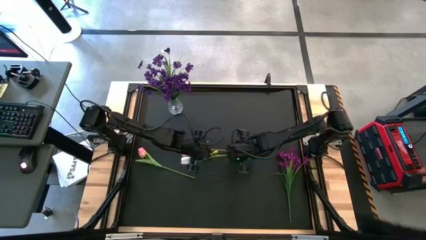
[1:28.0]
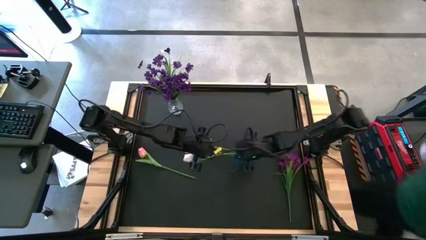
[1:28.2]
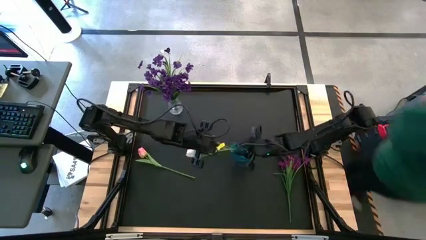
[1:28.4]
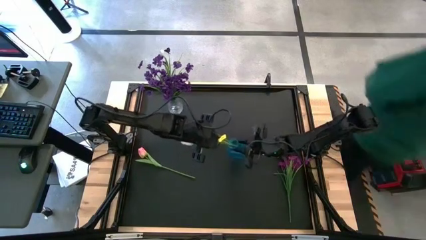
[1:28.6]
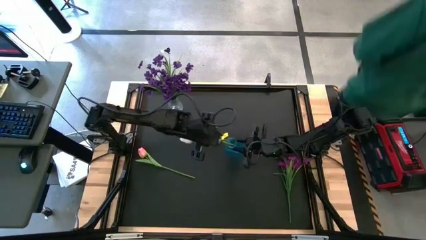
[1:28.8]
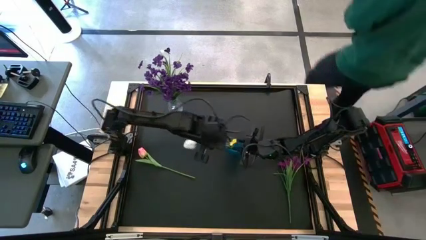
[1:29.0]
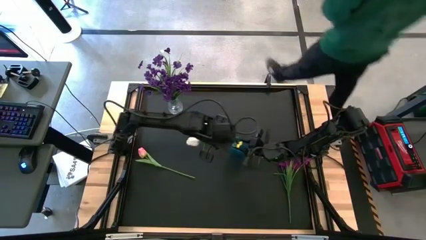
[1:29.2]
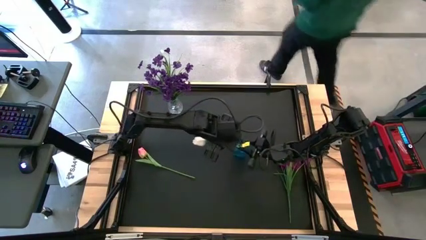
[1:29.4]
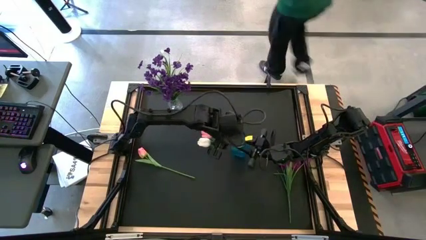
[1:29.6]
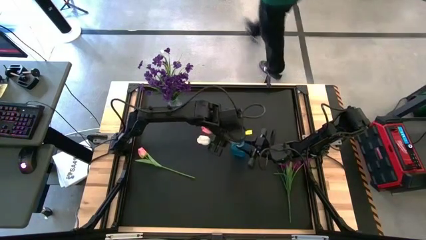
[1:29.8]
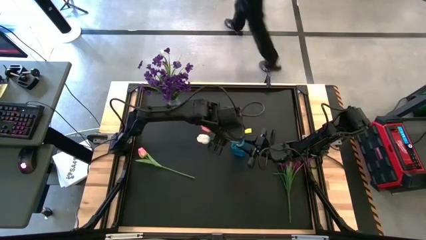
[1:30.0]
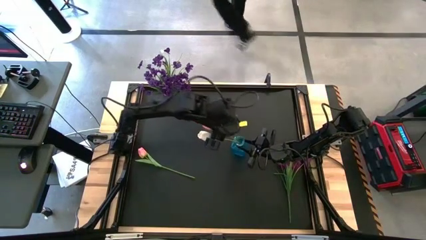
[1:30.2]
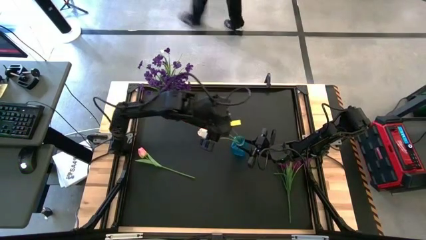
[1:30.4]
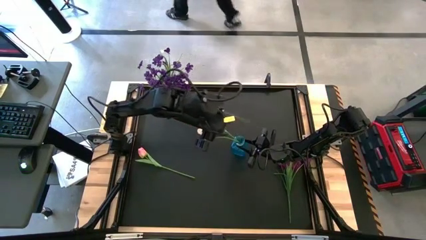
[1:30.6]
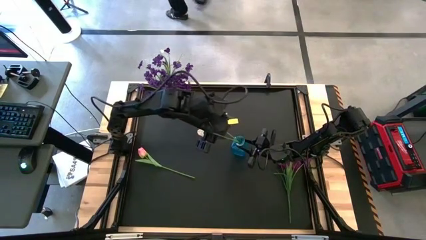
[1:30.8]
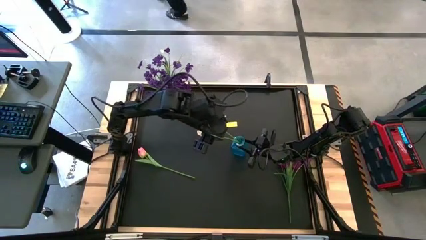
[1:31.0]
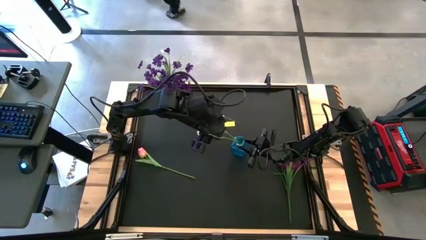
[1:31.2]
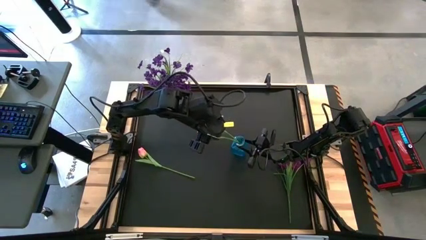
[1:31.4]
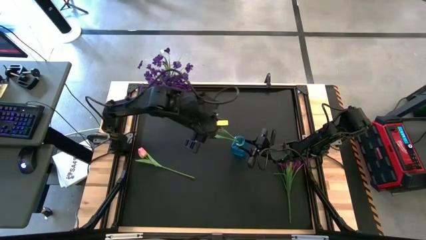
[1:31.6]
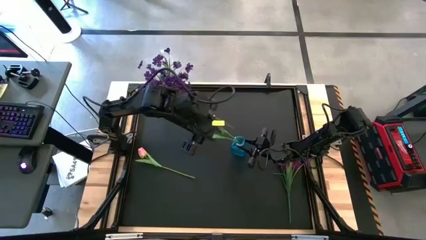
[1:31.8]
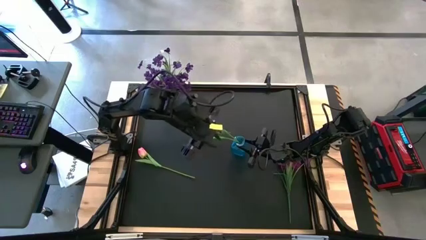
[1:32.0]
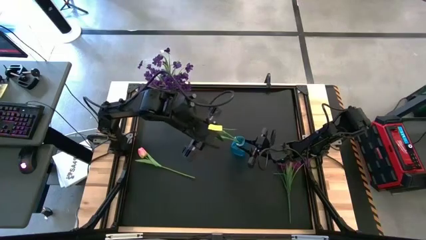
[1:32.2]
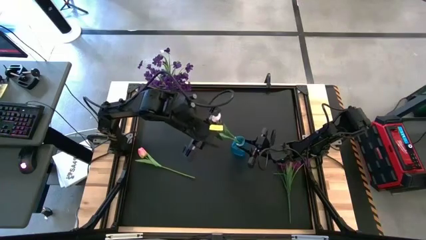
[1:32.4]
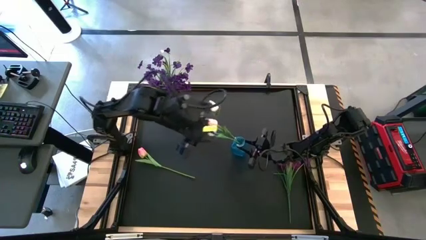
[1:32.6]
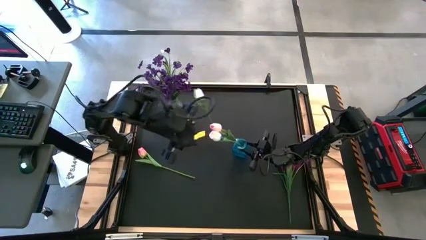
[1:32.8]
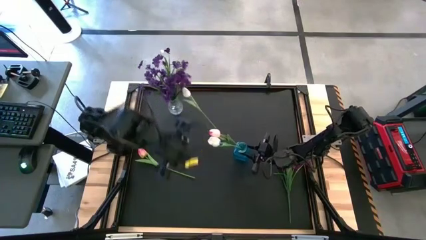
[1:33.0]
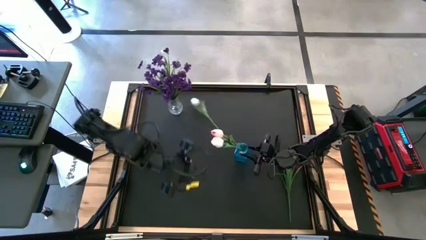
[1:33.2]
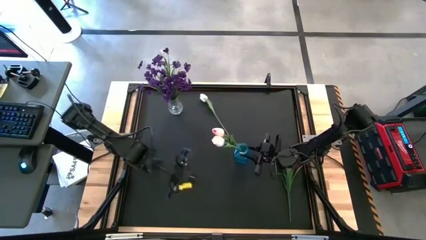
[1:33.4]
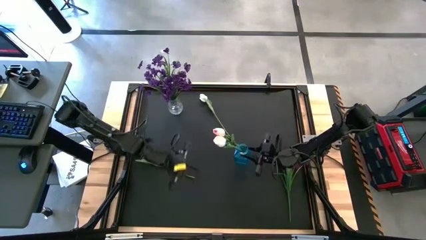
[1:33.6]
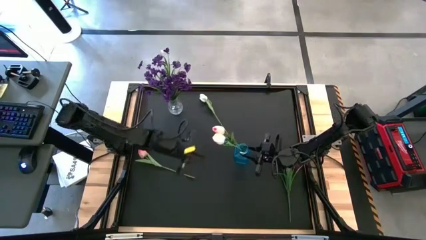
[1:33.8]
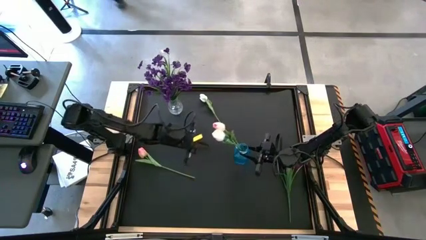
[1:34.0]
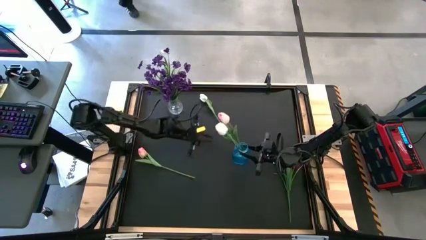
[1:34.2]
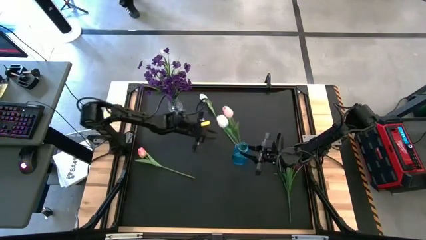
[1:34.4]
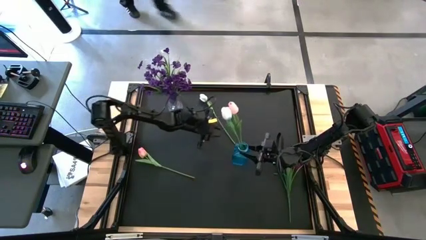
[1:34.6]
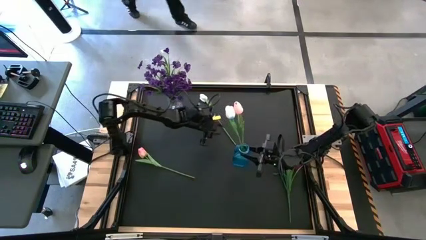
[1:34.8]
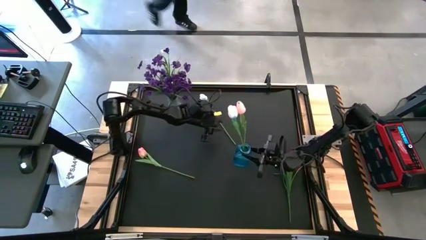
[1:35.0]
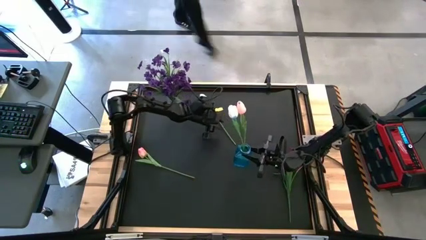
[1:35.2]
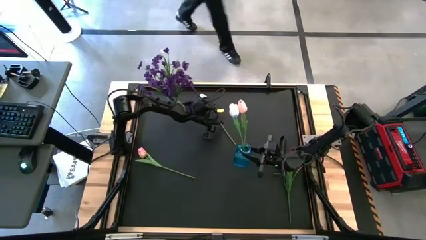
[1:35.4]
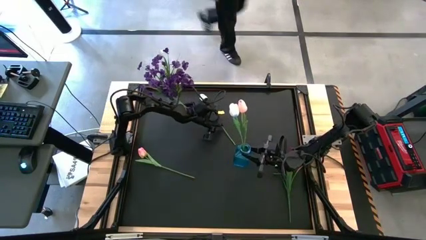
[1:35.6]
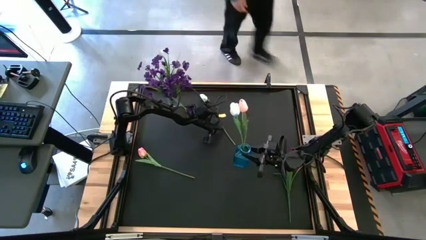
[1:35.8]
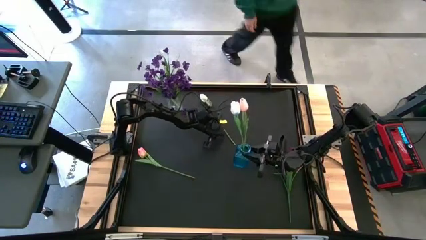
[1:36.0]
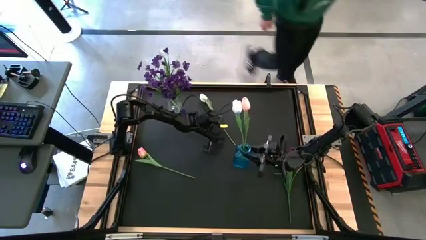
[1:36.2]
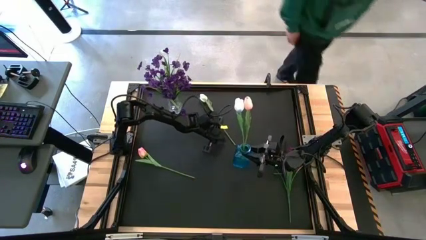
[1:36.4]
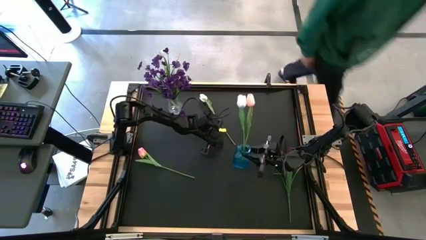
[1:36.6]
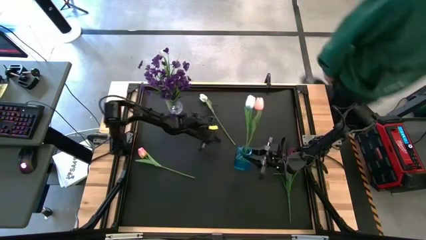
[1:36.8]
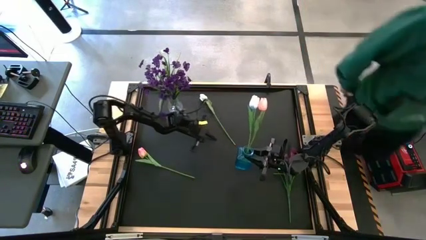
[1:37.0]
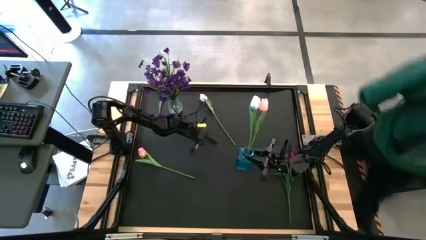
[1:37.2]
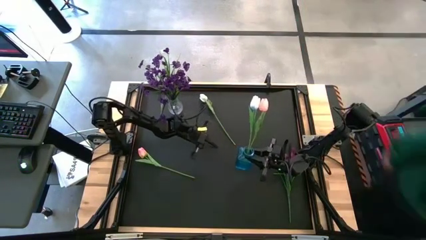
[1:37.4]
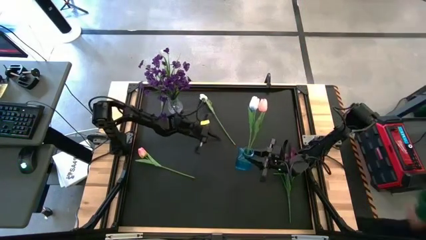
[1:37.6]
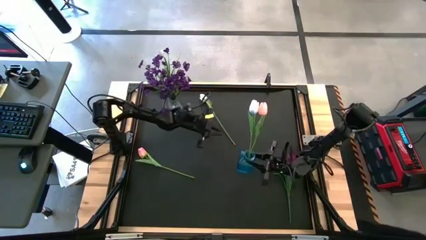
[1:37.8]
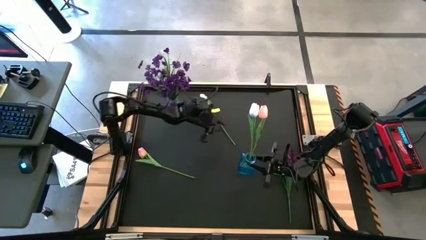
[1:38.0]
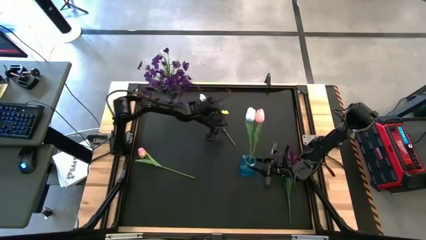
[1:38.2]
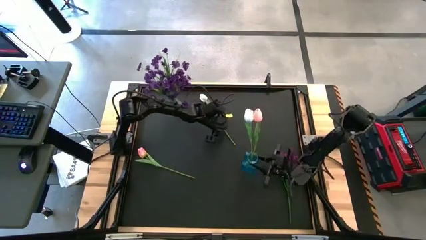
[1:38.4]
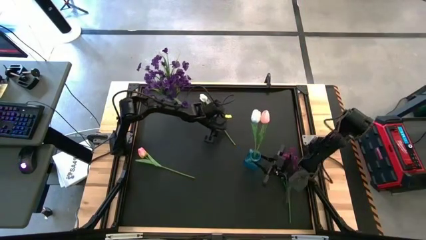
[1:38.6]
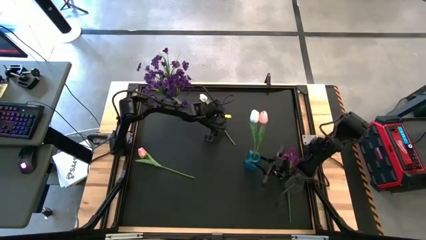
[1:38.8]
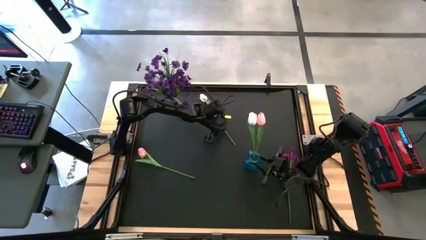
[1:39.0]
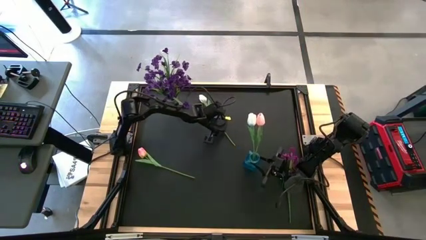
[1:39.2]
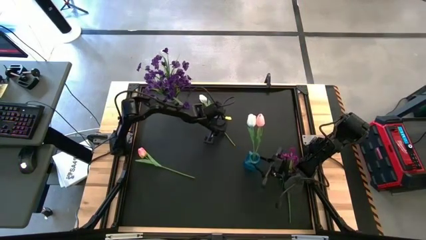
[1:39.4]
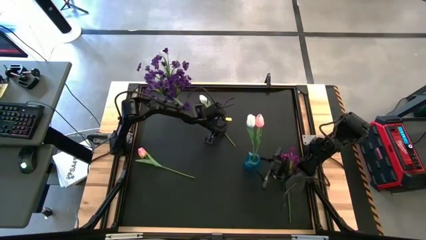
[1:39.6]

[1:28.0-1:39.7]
Task: Sort flowers into vase by color
Adjust the transparent blue vase

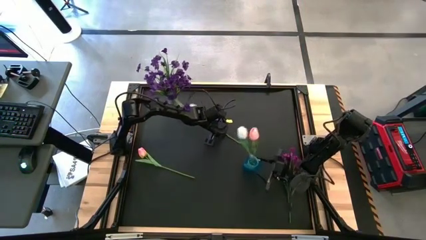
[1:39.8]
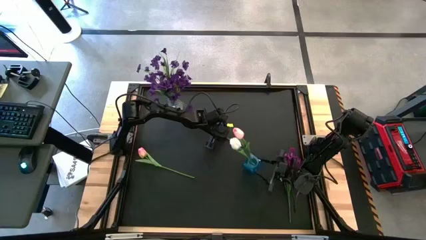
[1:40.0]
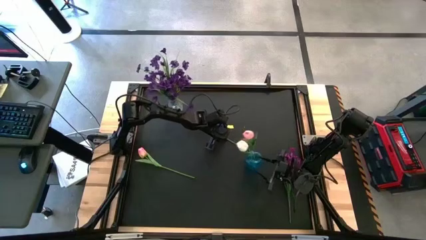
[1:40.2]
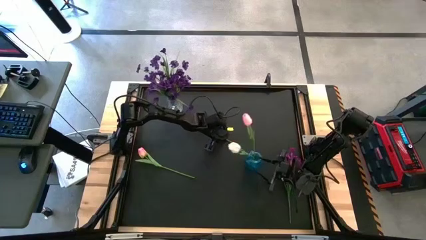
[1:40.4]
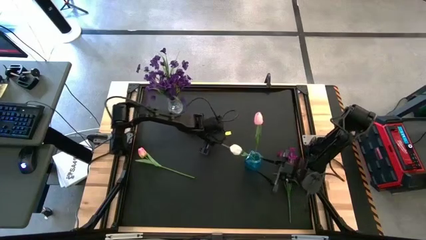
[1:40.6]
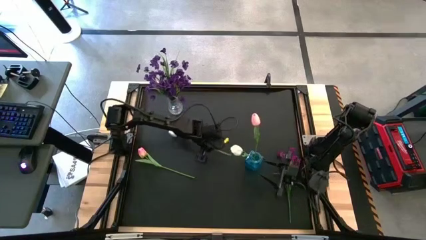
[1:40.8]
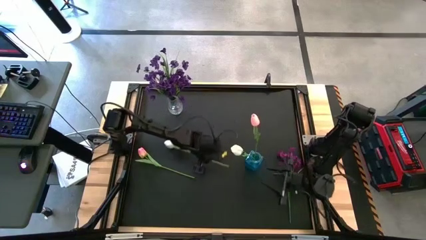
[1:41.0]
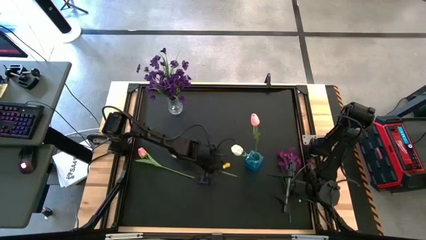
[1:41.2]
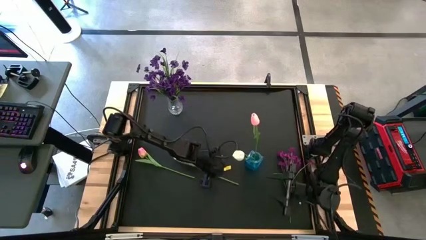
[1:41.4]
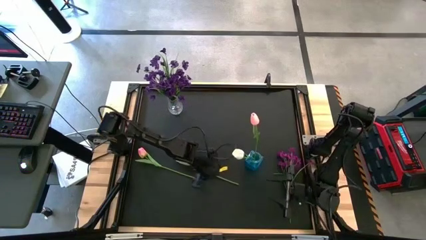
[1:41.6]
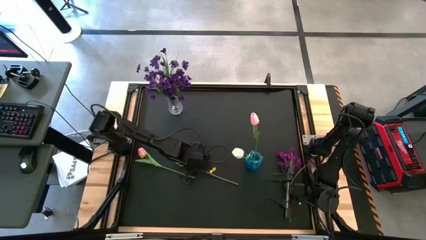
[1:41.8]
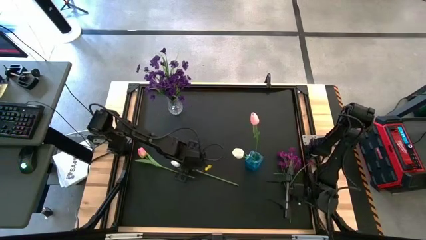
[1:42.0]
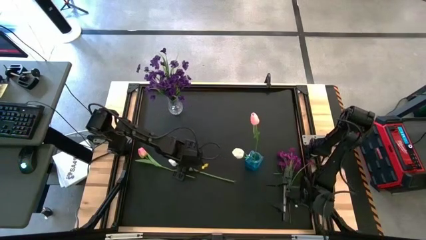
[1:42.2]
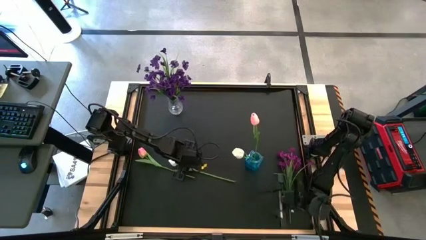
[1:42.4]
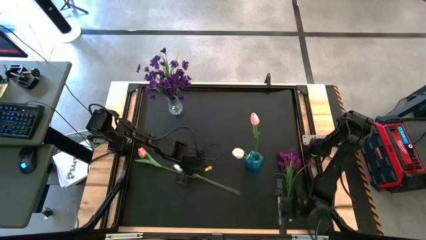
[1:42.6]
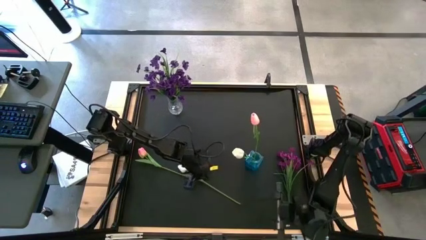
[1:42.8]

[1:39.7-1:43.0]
Put the white flower into the transparent blue vase
